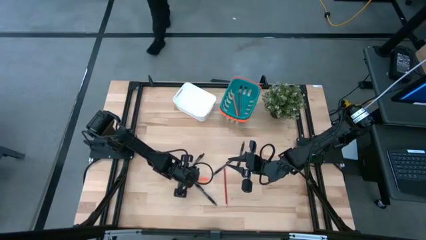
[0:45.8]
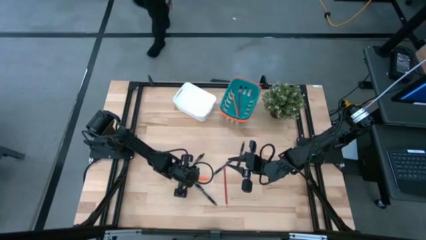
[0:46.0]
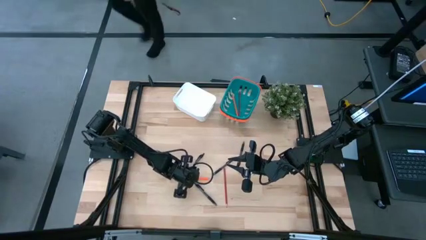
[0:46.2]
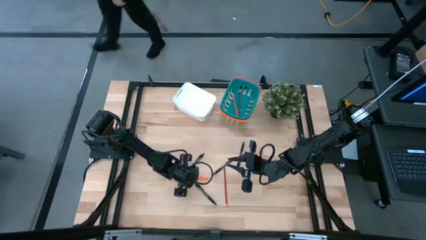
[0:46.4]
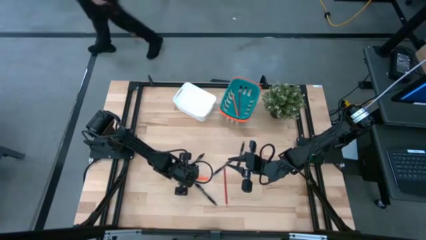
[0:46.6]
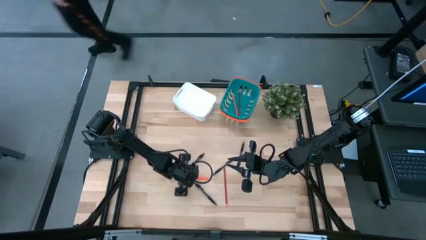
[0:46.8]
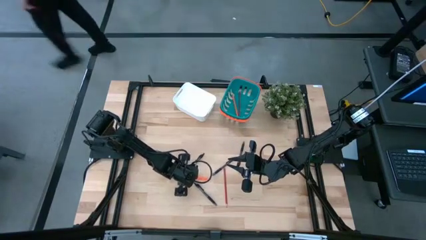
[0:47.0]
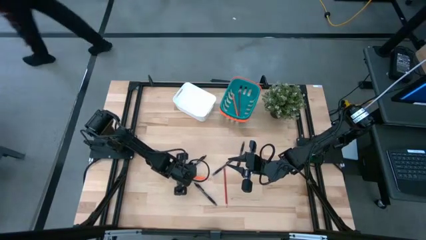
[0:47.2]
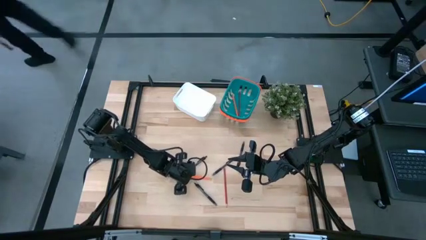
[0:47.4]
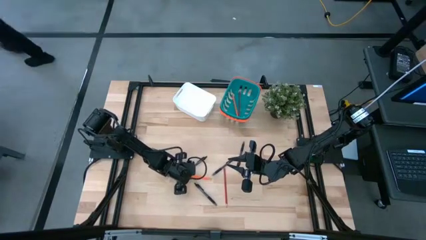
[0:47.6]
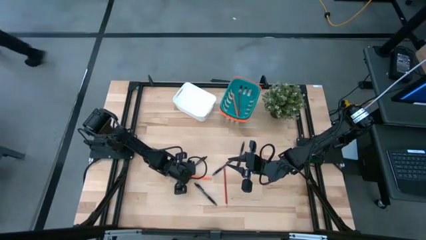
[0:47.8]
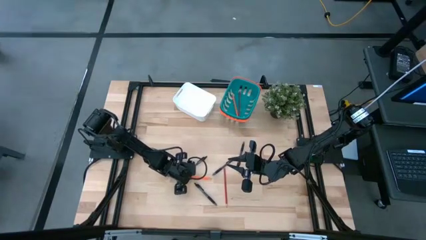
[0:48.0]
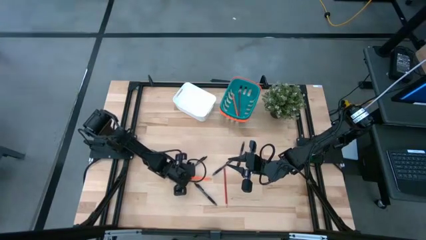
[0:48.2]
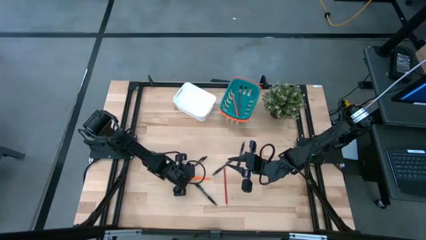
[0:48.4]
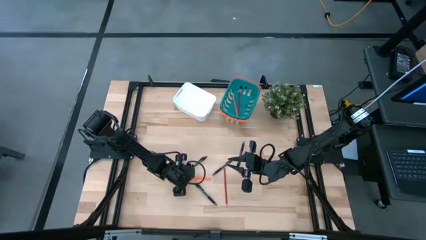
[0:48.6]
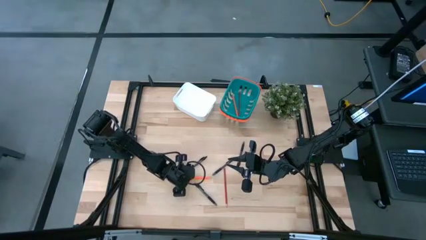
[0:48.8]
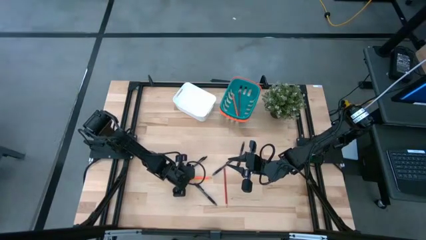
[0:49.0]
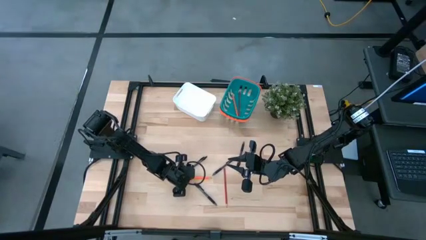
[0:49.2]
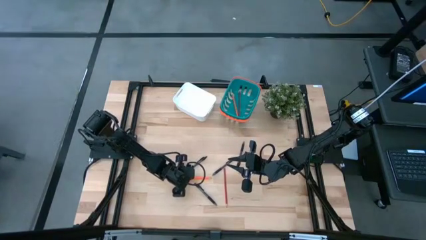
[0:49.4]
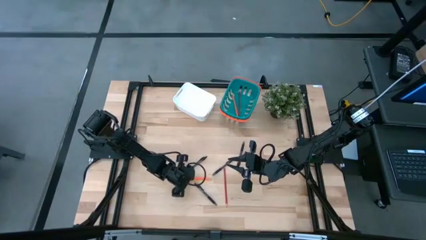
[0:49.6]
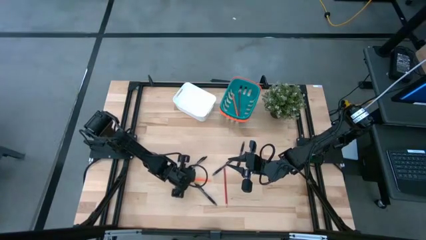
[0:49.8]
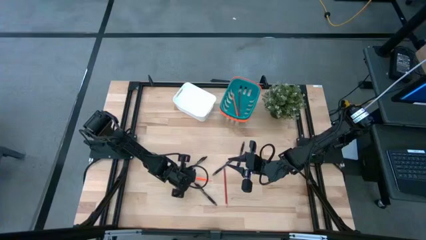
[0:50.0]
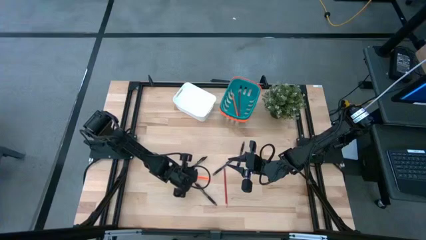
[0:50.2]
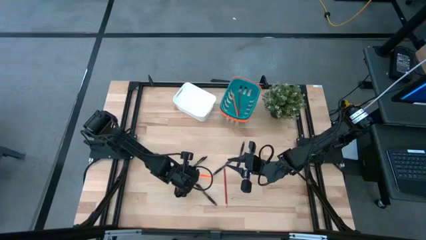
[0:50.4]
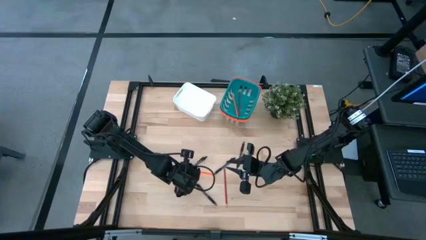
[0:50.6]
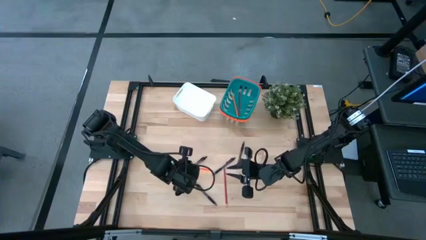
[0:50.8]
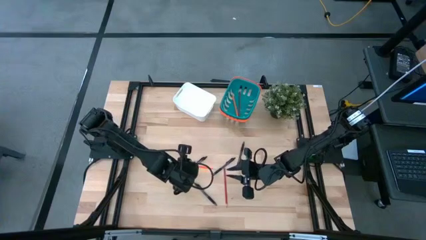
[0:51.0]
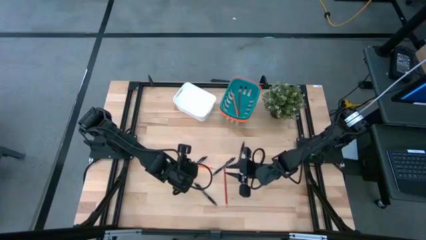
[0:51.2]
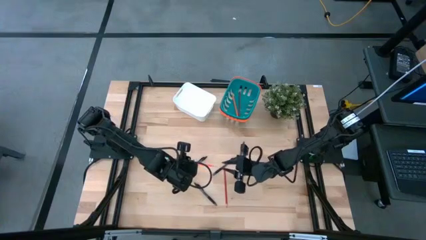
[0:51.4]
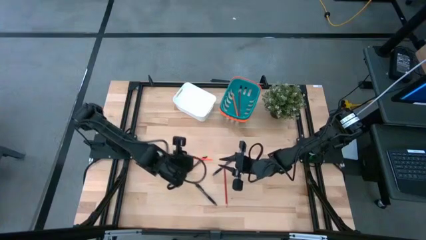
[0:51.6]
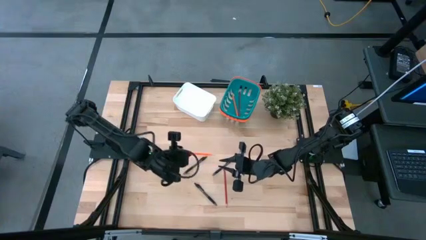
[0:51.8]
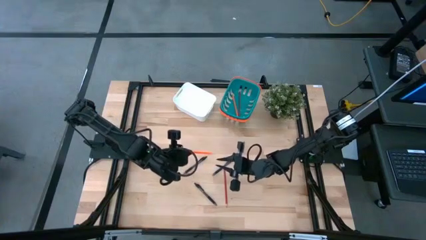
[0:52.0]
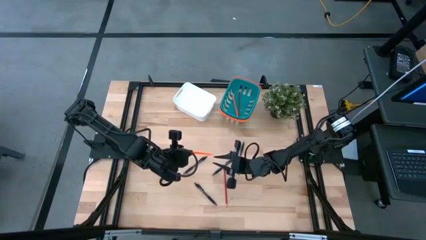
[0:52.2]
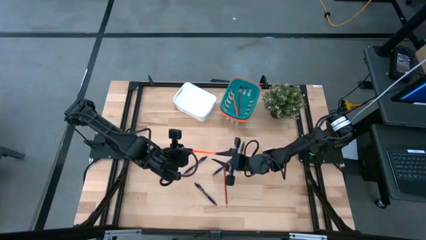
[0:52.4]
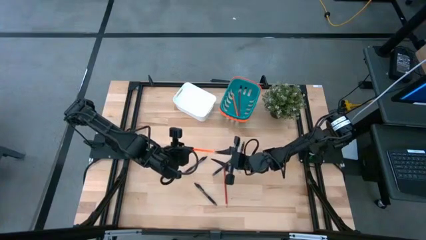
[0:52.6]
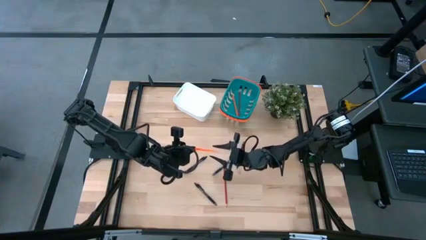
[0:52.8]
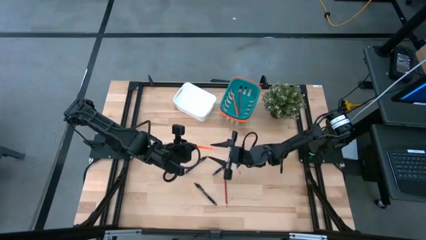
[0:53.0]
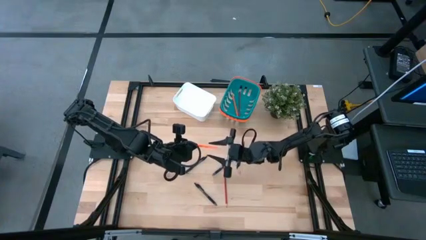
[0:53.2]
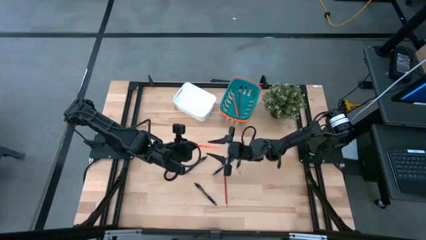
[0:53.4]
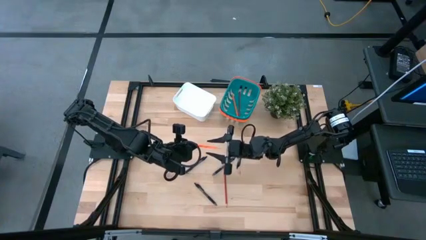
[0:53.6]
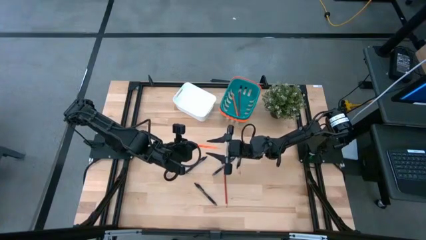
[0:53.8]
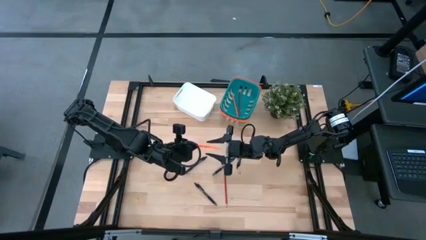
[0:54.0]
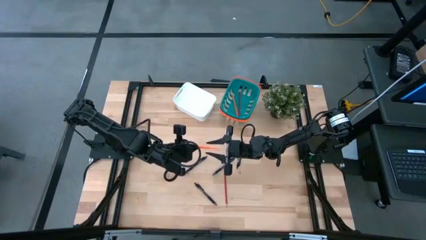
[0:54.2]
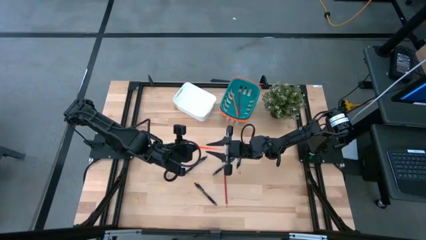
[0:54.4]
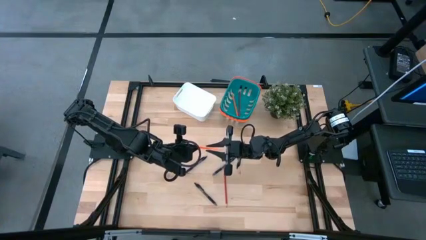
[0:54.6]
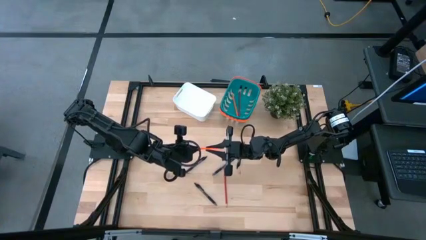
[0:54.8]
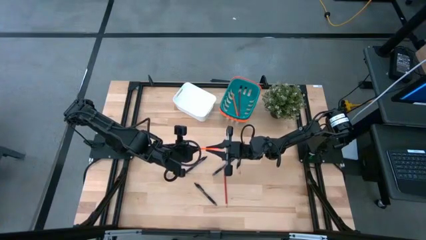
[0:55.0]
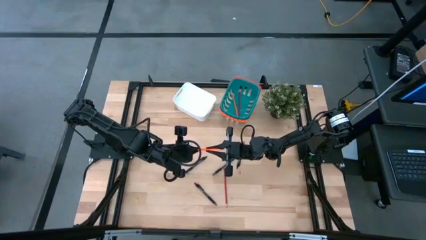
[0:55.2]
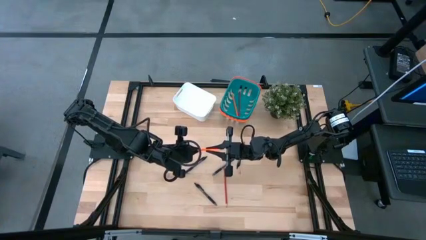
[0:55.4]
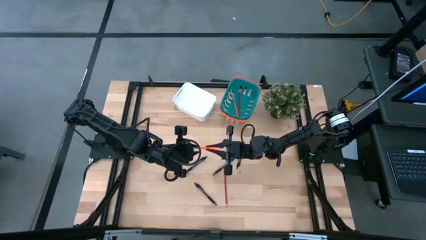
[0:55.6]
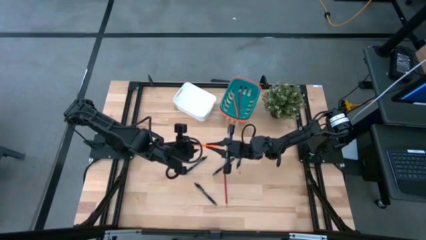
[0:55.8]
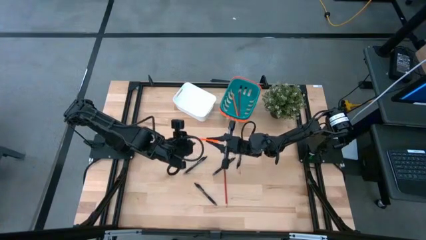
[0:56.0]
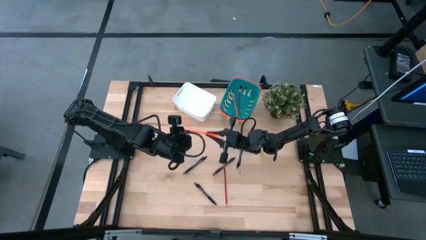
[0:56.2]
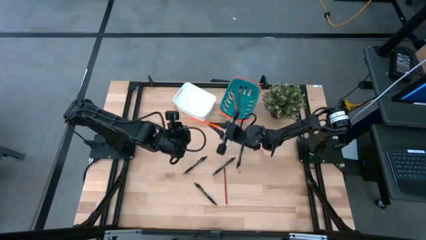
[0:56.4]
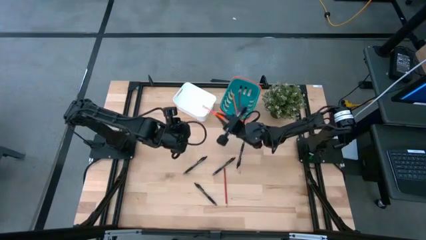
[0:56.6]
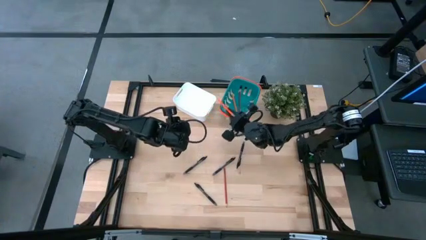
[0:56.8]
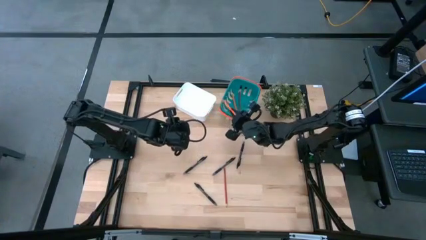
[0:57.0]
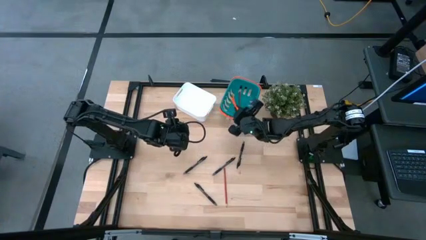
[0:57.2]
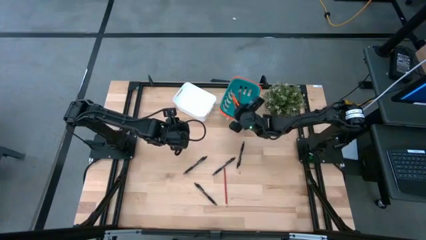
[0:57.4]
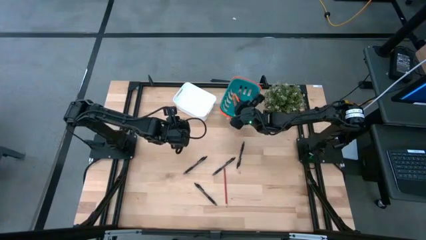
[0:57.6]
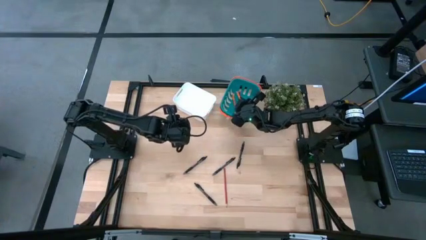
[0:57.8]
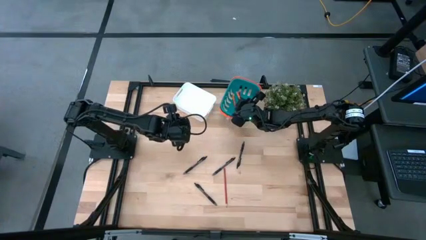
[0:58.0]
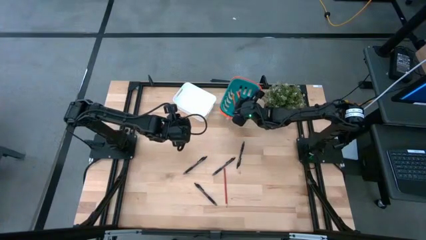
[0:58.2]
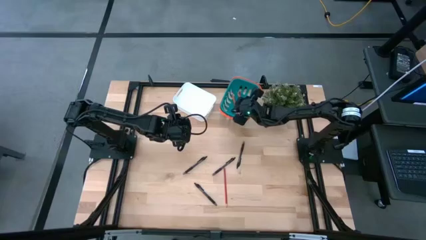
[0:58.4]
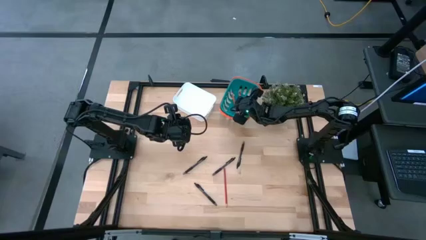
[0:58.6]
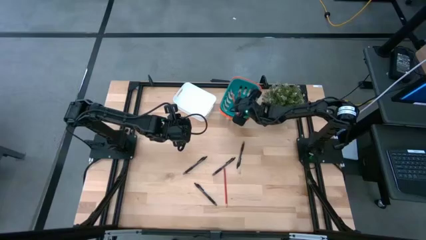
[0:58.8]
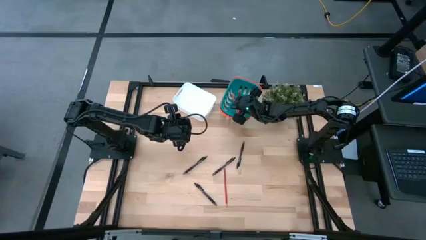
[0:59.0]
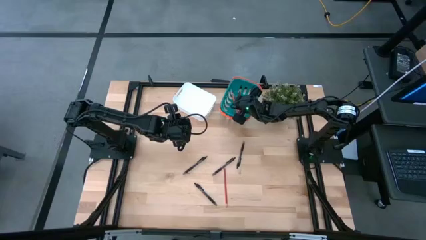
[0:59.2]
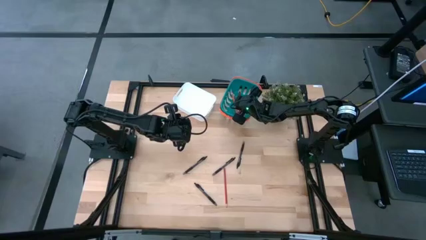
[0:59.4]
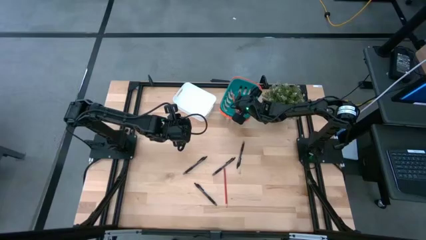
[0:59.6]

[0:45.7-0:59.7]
Task: Sort pens & pencils
Put the orange pencil into the green basket

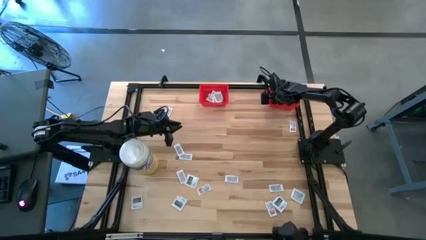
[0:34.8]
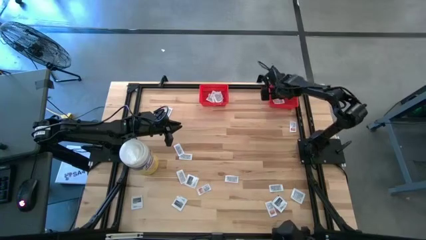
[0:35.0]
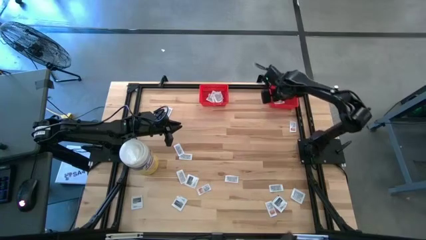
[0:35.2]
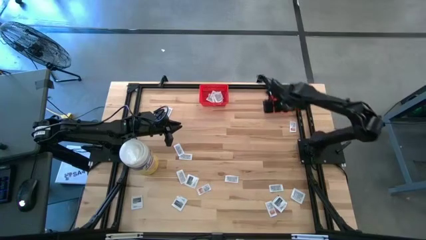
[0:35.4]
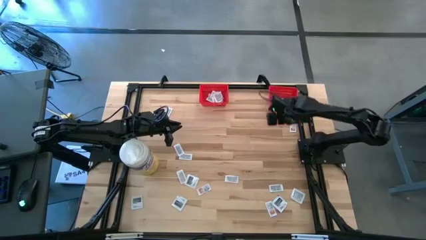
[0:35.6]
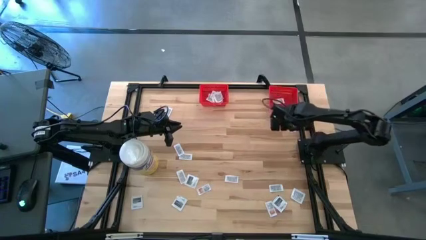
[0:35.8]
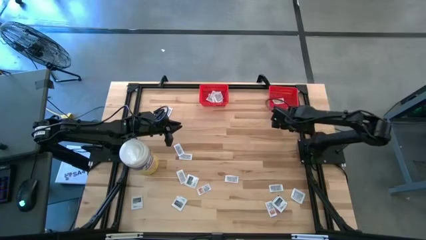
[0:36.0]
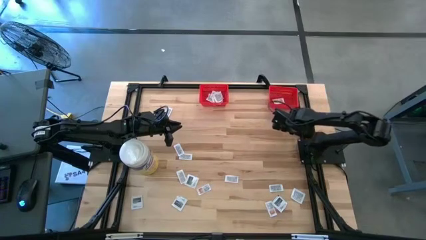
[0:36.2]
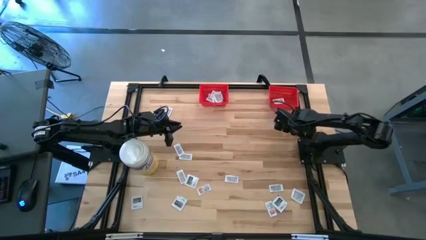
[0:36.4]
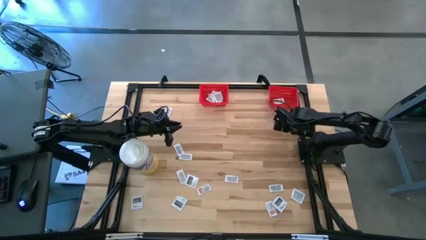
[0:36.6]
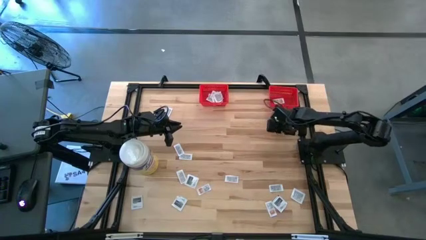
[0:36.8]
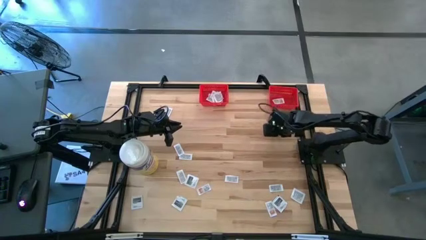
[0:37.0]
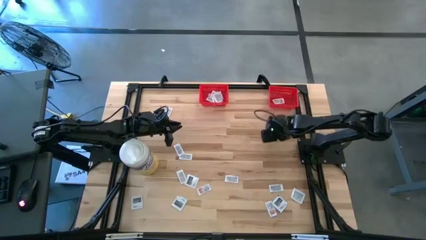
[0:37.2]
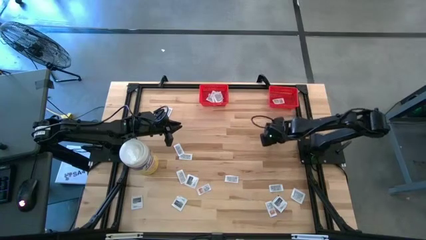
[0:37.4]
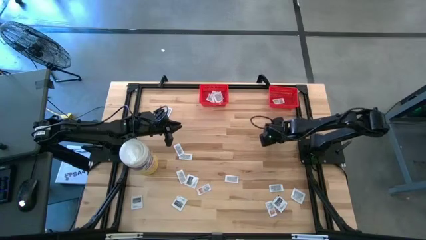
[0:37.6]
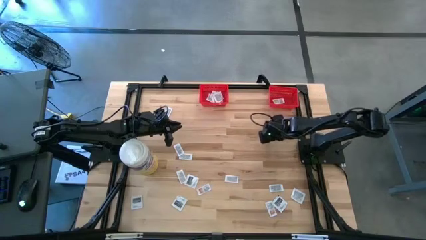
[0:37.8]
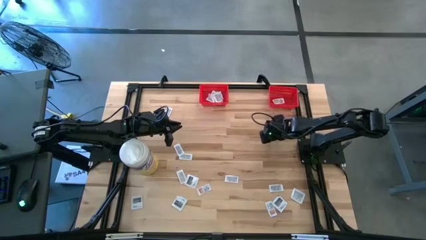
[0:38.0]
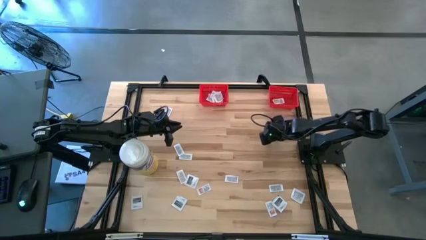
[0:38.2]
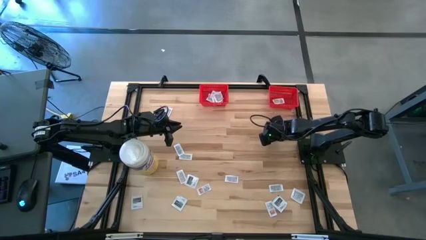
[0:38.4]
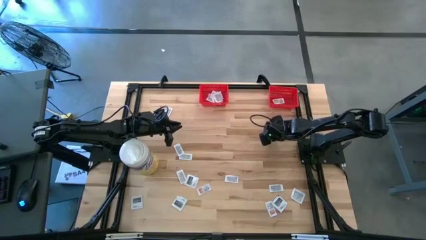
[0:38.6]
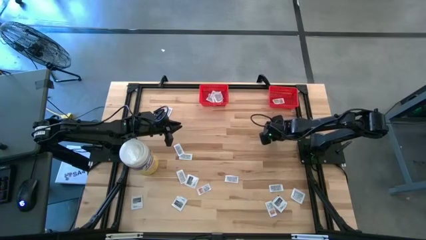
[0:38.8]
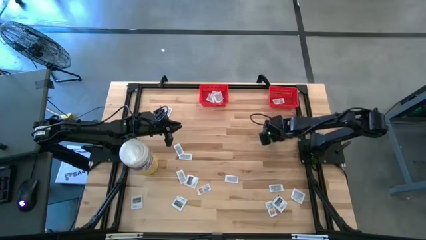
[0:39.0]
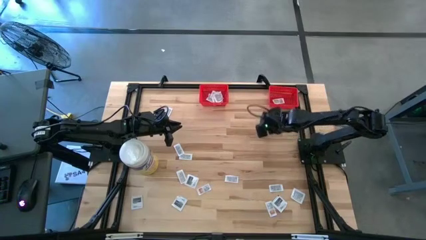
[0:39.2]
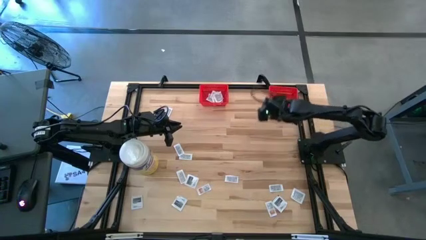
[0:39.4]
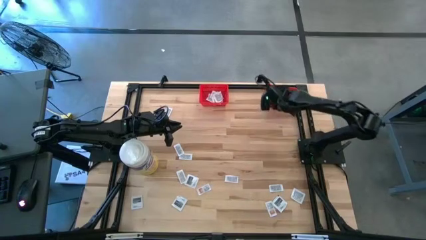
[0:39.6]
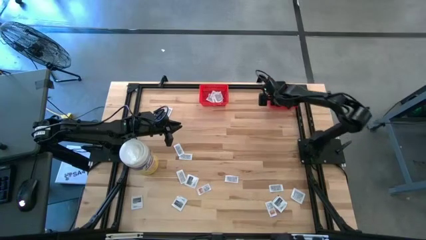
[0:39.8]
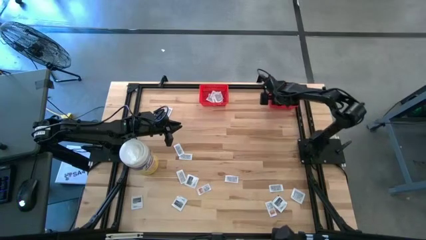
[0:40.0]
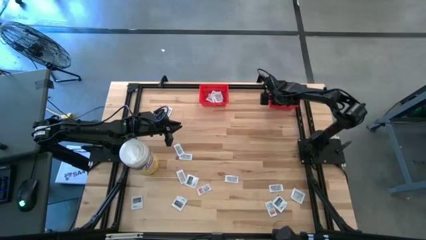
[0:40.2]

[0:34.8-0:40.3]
Task: Pick & Place First Aid Supplies
Put the ointment pack into the right red bin
